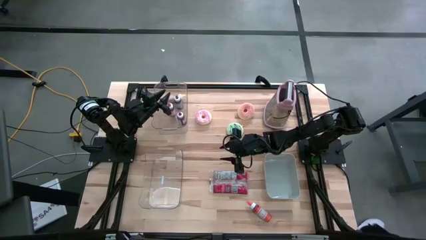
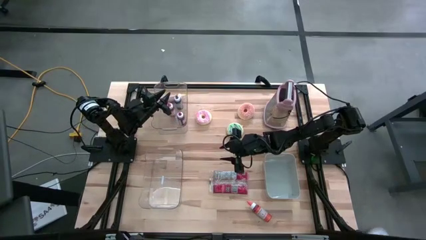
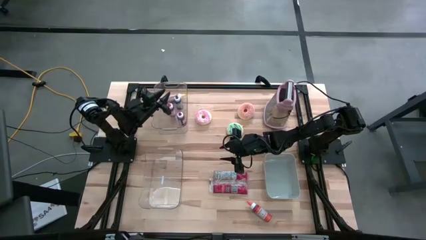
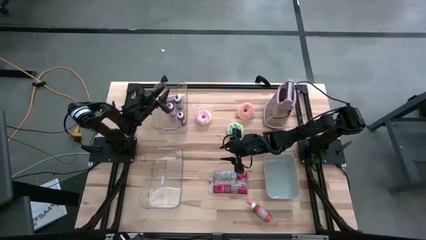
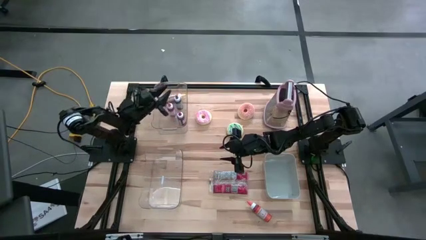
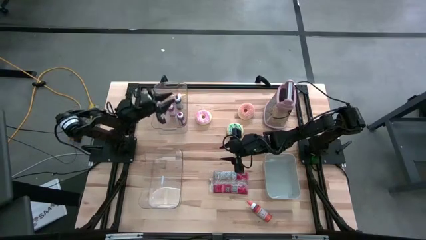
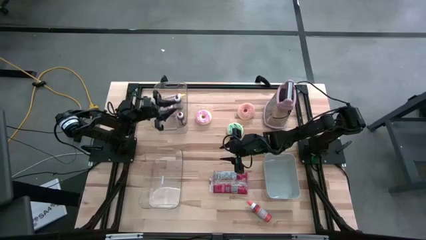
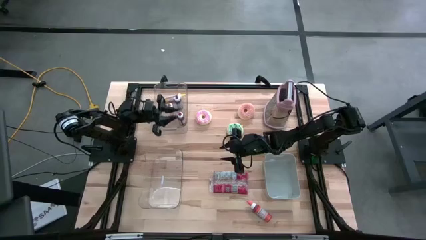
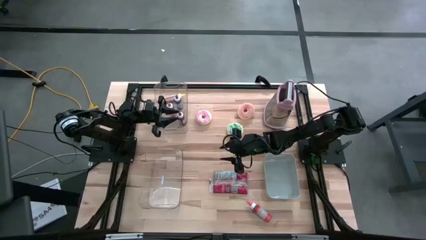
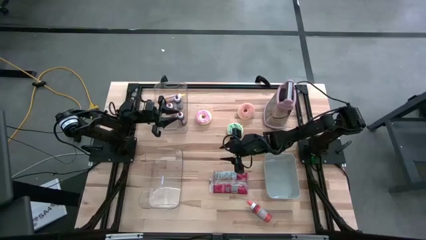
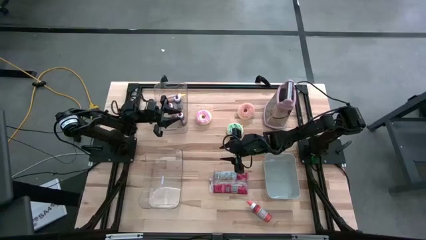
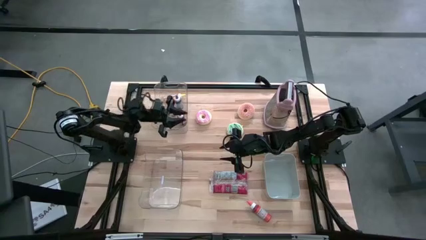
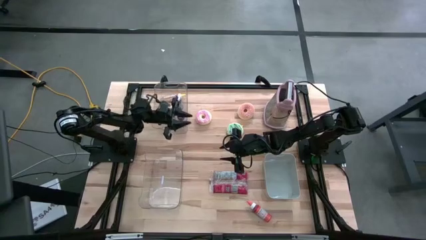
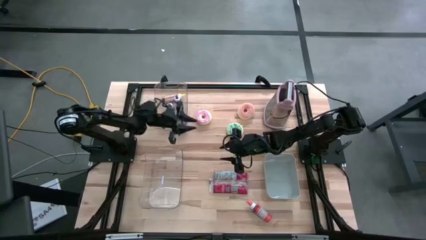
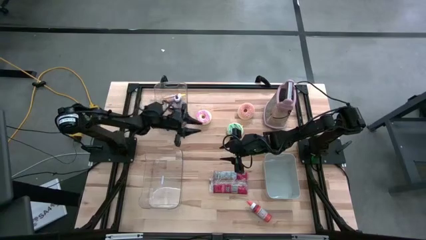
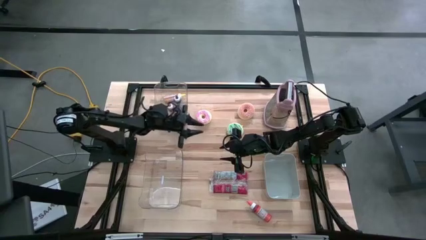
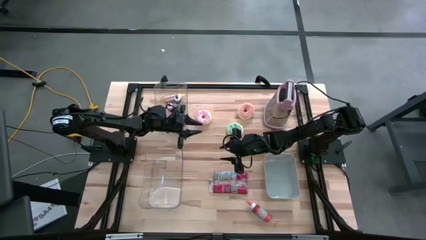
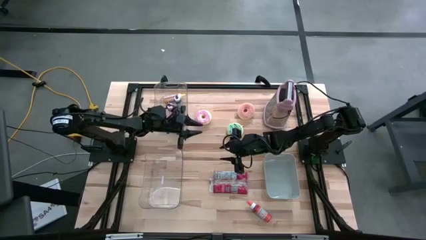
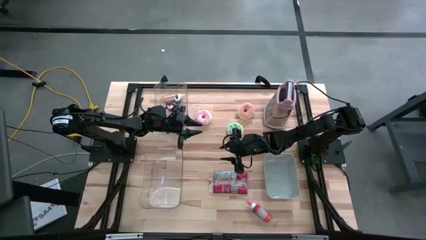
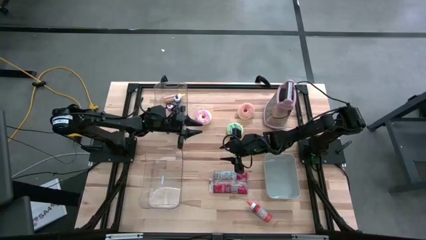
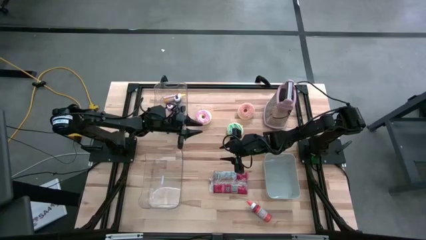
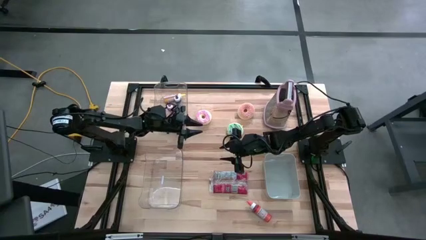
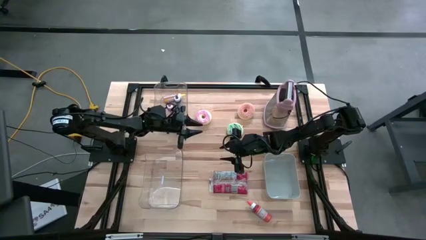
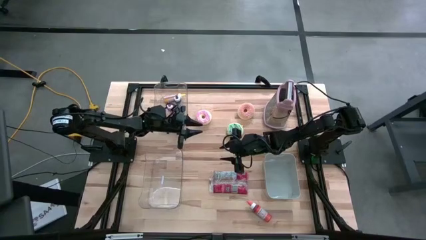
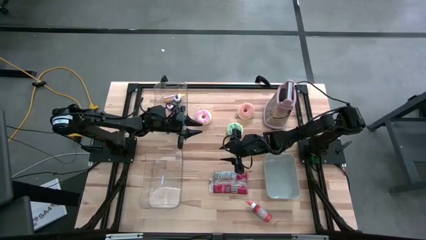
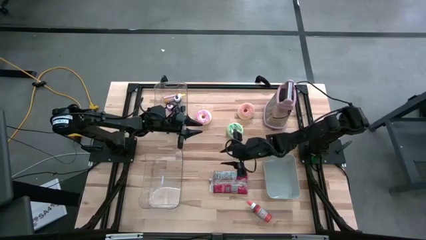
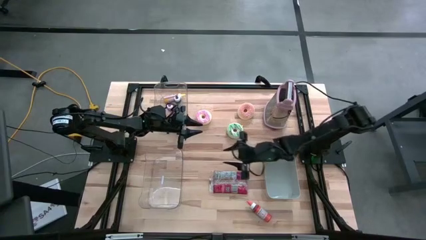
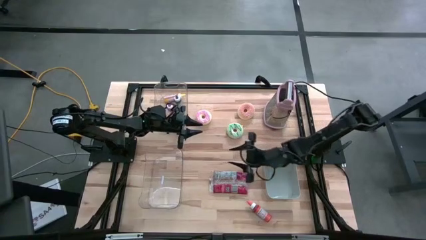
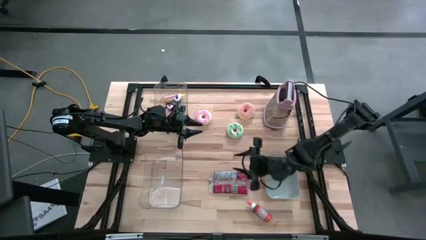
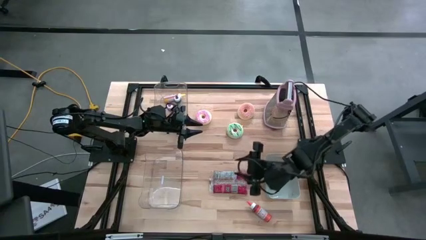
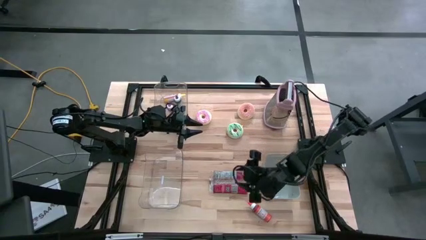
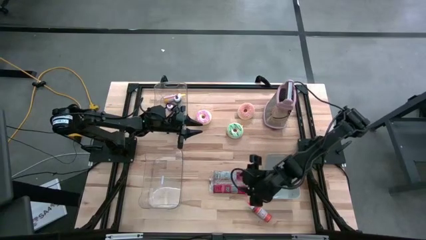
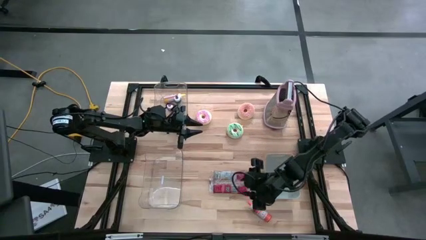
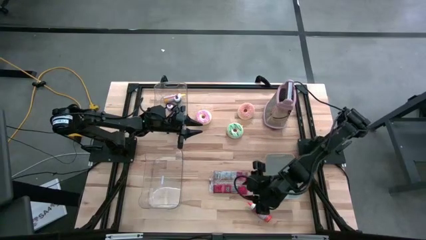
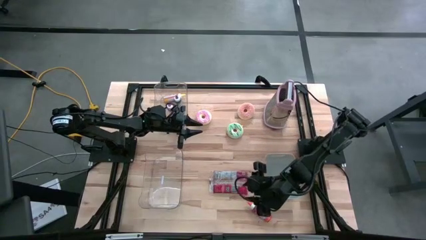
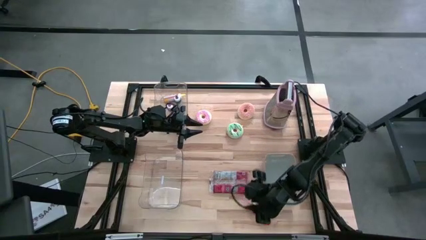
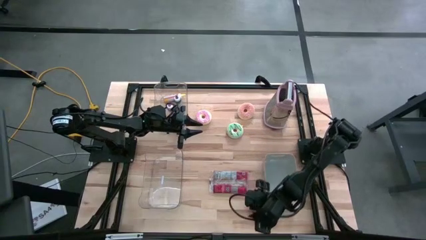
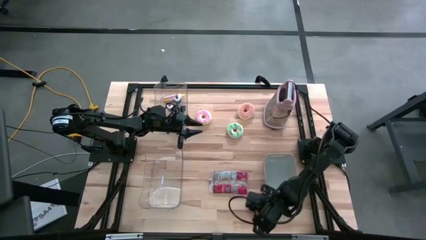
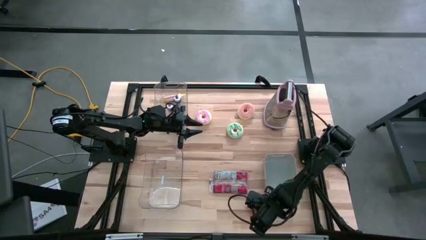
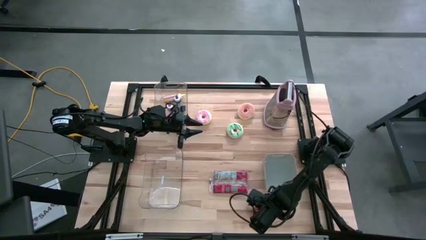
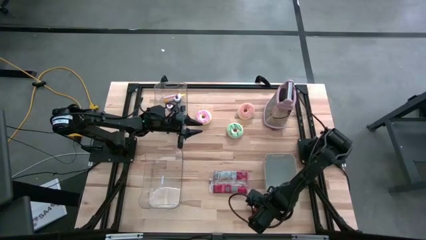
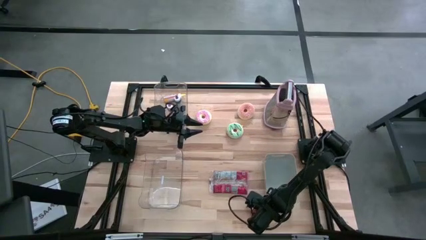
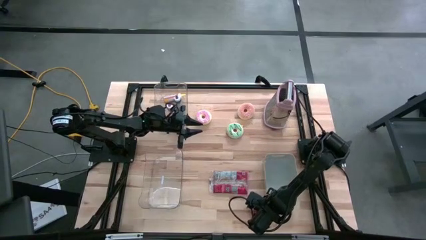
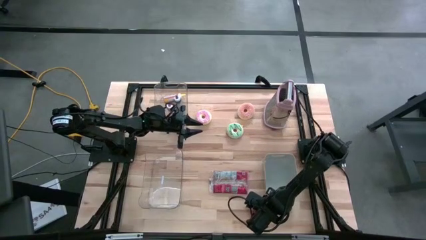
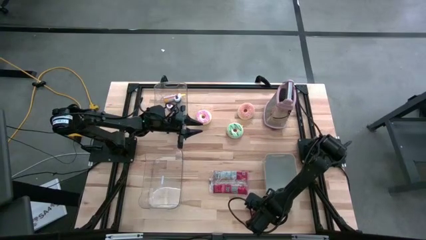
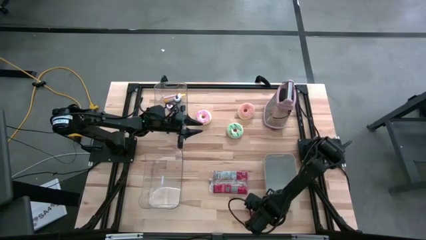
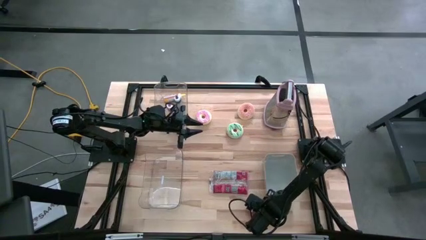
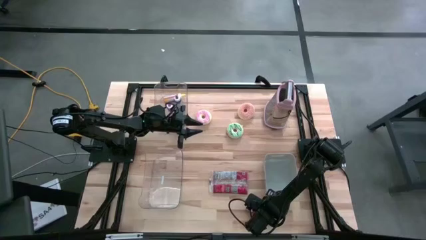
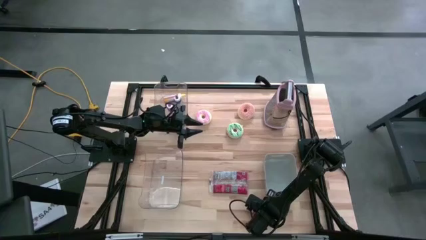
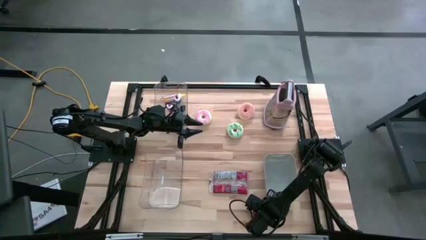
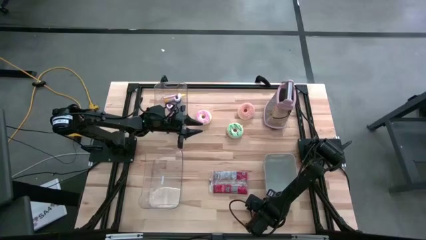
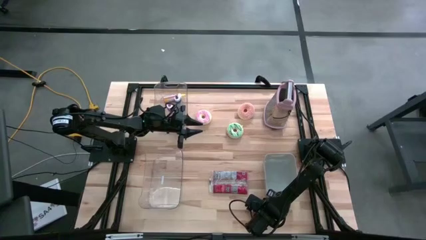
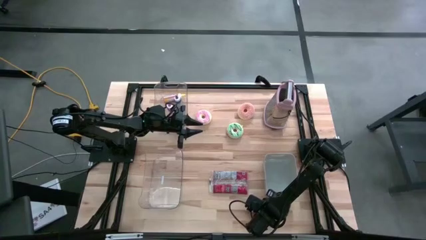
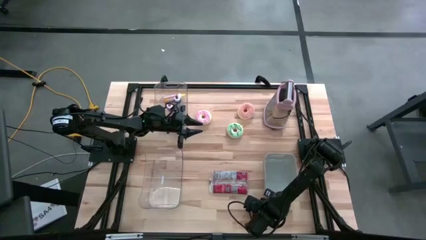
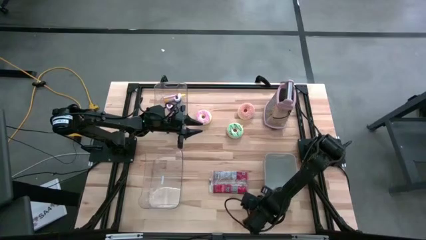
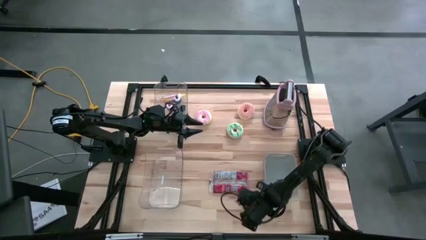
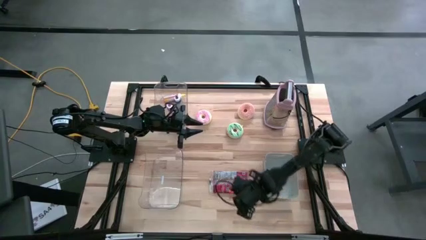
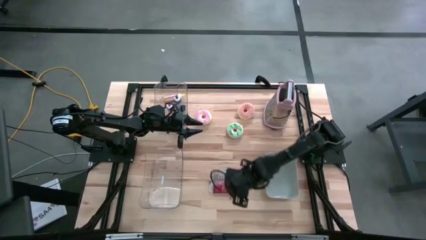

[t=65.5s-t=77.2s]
Put the orange food coloring bottle into the top transparent bin
